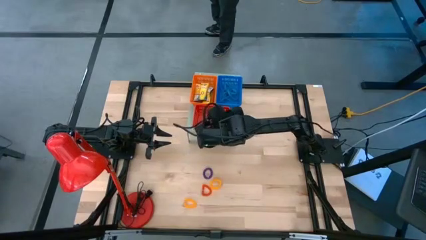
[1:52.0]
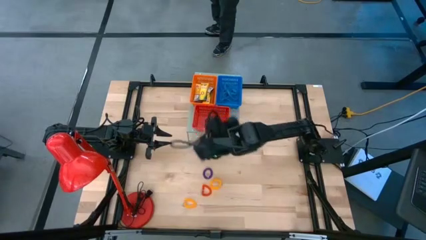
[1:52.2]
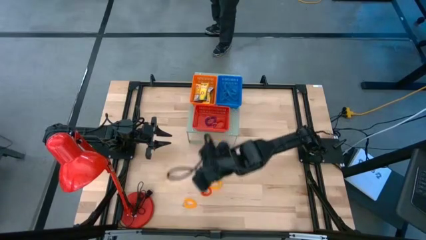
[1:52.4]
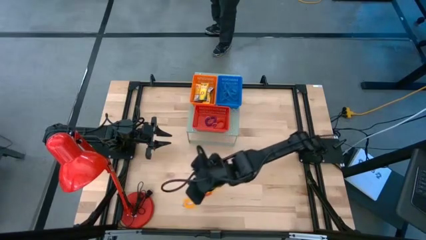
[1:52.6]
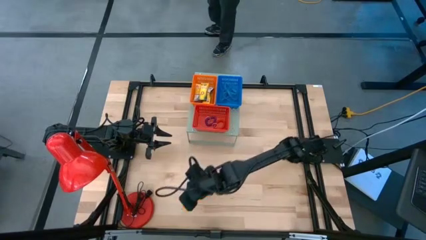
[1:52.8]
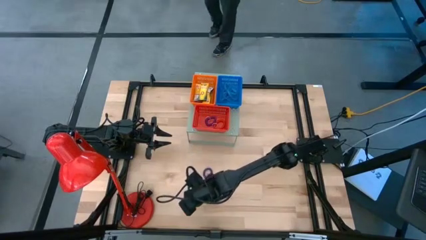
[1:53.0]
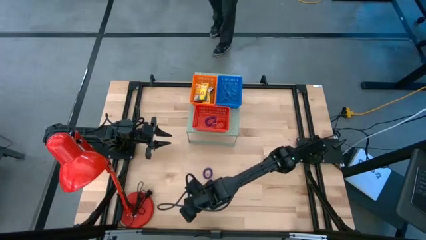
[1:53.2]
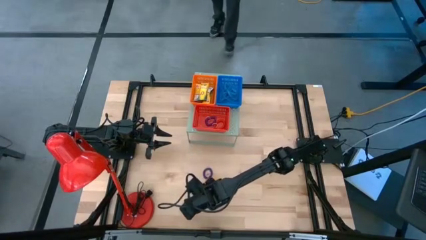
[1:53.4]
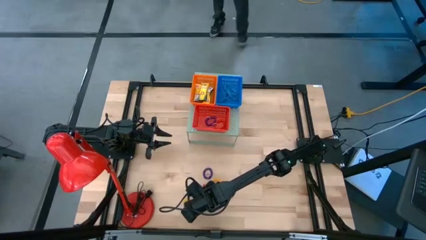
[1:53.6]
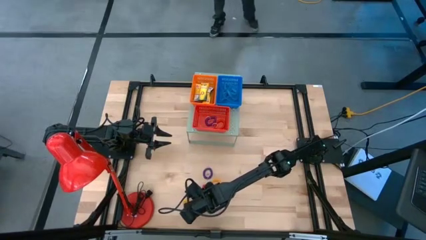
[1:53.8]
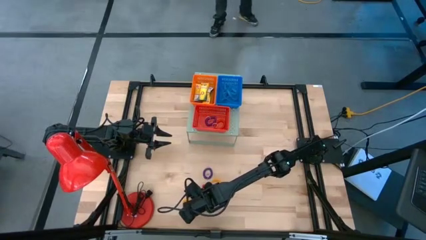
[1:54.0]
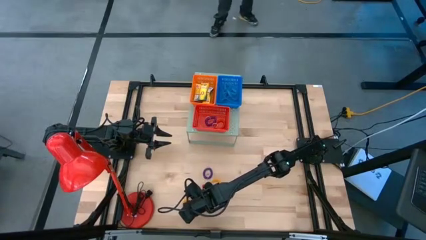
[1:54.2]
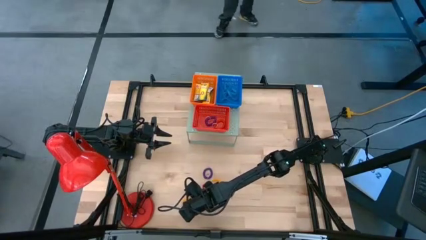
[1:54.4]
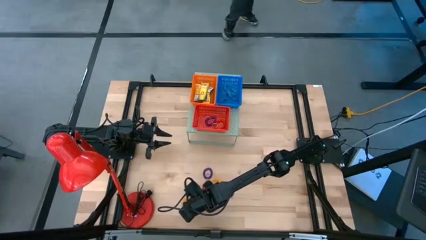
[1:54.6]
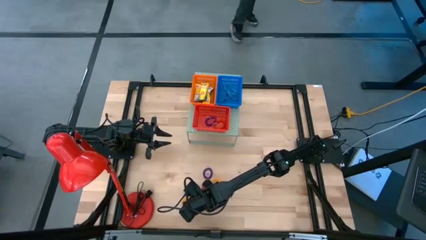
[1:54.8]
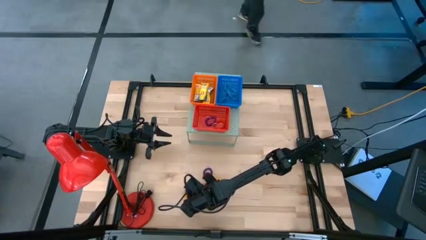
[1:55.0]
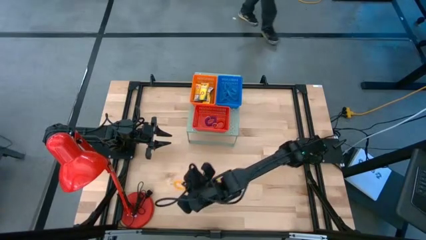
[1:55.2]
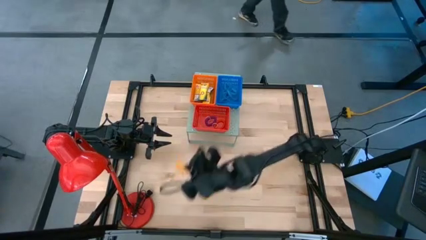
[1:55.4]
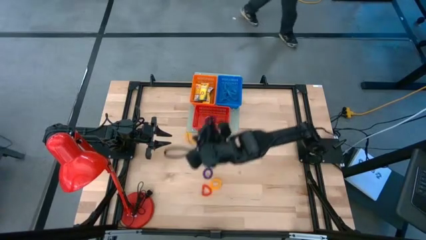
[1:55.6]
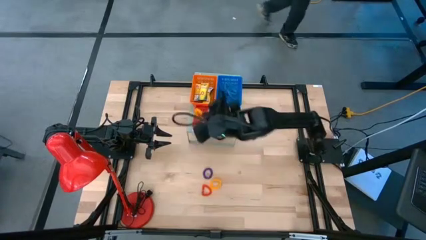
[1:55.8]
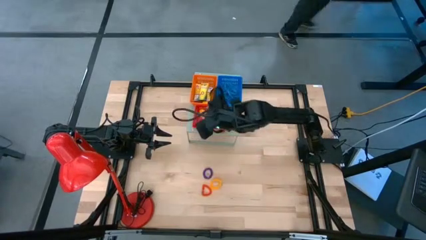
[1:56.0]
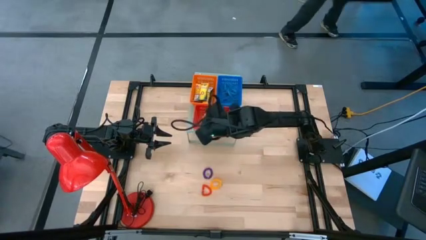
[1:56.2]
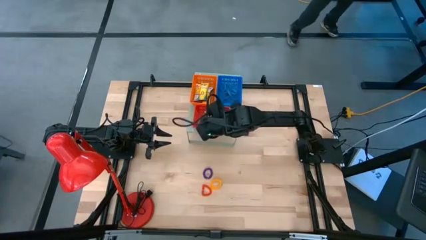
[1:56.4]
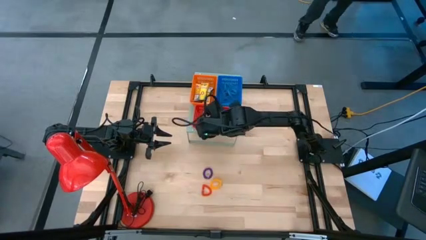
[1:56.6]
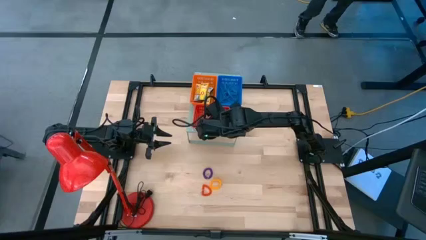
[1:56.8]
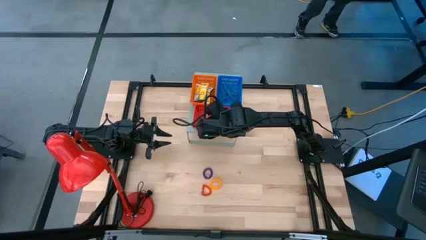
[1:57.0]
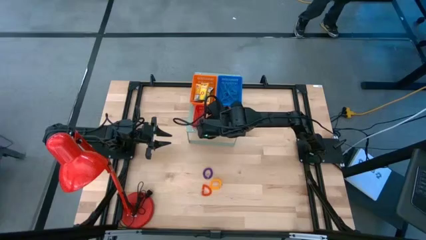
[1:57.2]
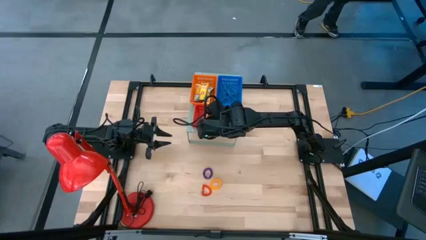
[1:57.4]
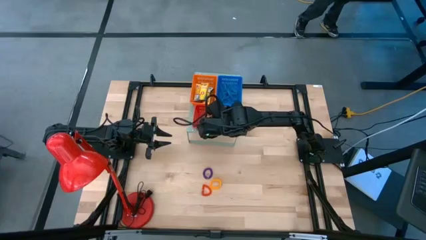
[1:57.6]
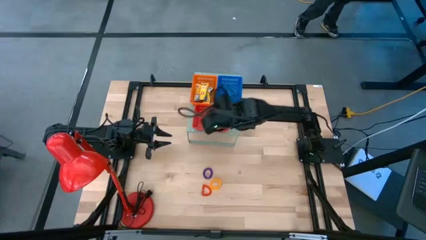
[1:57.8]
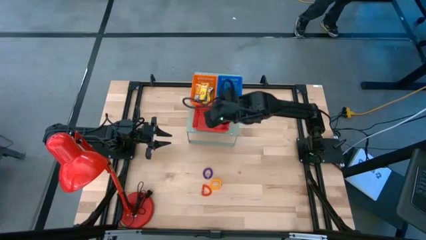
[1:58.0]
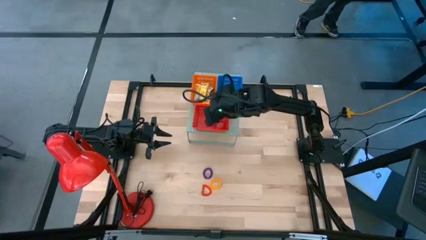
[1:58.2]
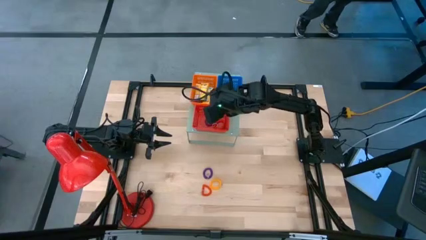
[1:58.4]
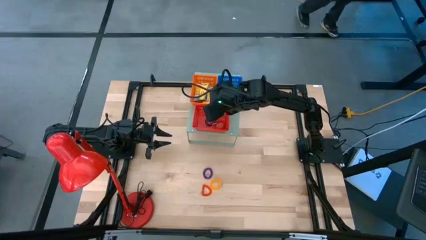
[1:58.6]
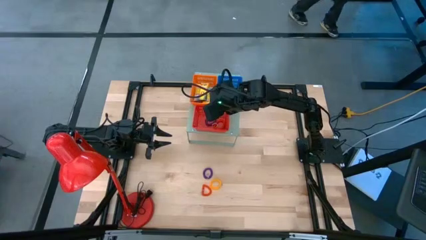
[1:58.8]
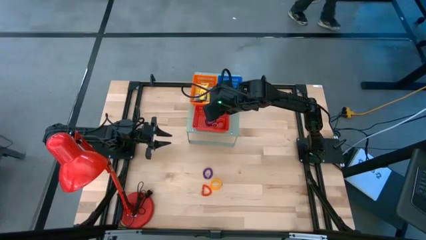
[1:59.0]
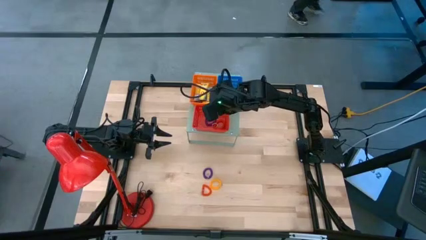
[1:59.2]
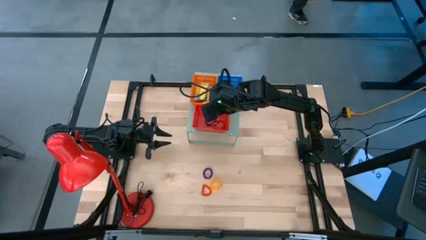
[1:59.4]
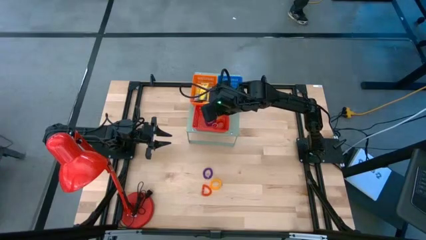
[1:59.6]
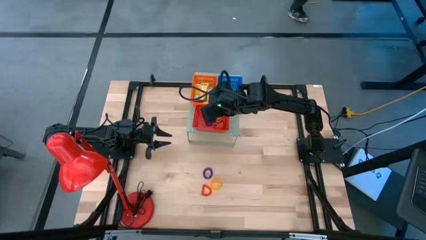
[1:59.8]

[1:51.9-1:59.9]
Task: Pick & Place Office Desk Supplies
Put the yellow spring keychain into the red bin

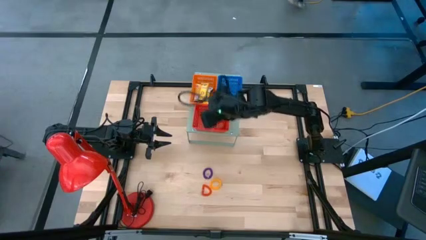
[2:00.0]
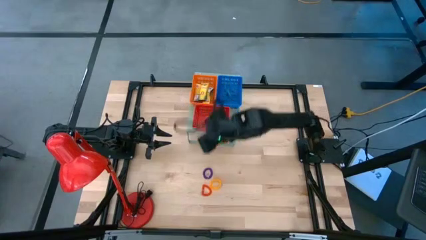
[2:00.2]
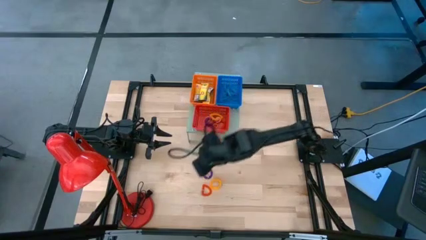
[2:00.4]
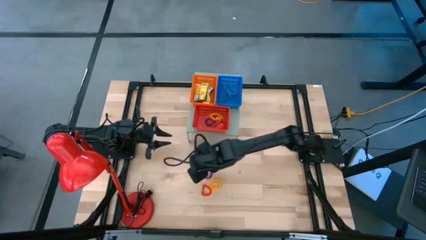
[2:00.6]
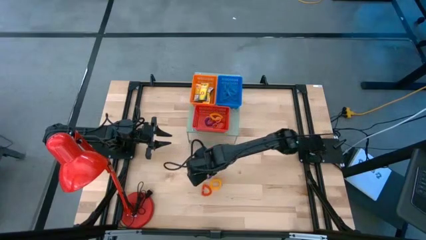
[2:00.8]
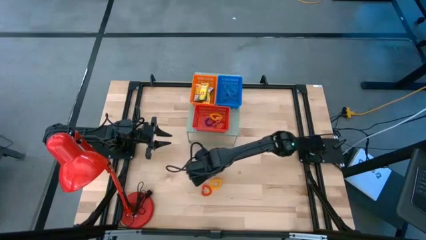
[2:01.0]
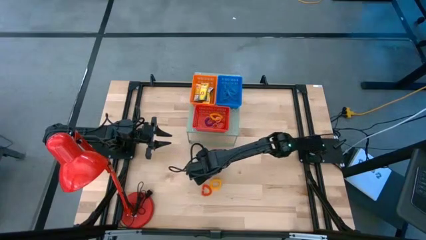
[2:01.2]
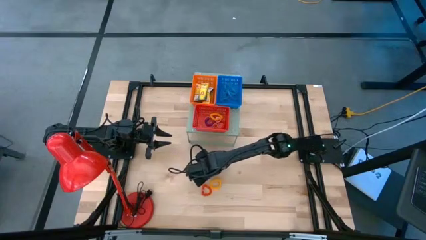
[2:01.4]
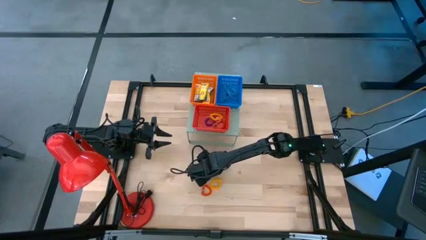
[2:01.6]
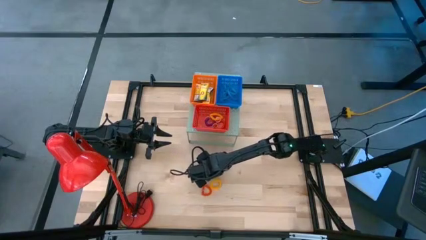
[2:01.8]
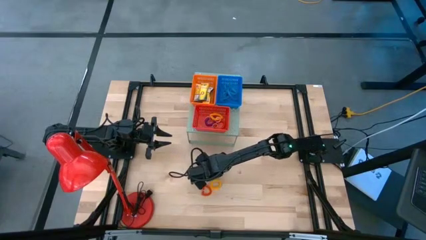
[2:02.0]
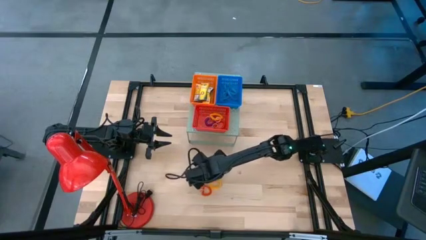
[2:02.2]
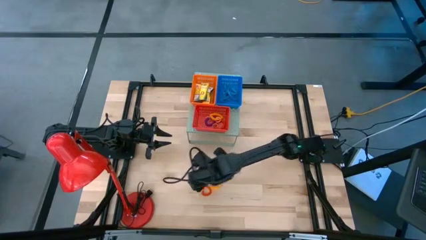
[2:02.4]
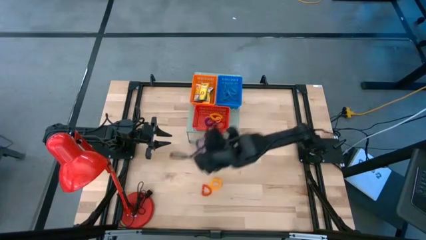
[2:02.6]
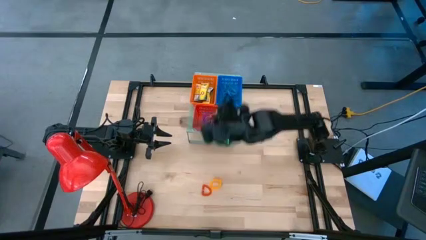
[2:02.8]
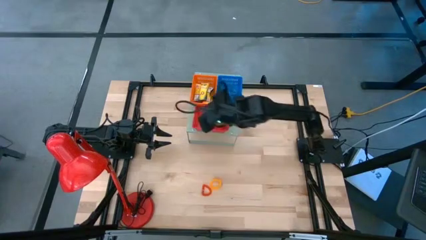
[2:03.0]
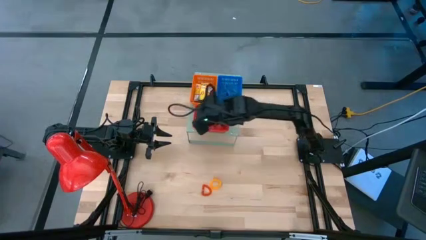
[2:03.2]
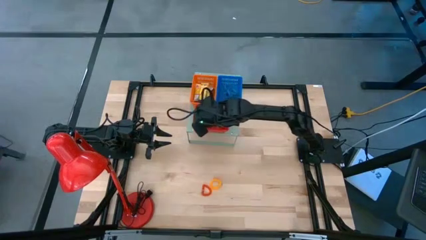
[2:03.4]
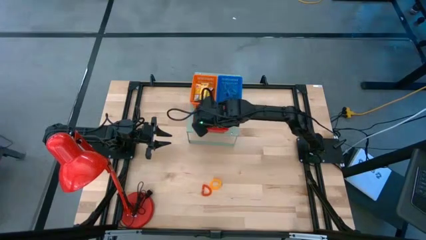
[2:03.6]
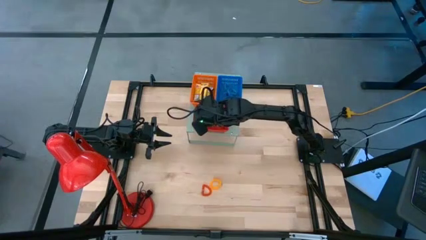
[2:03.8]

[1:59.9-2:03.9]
Put the spring keychain into the red bin

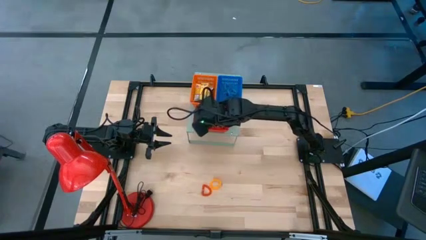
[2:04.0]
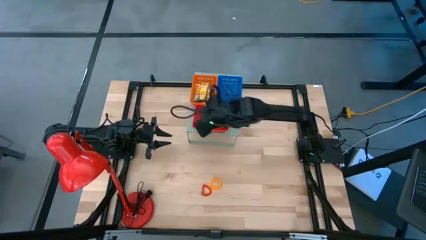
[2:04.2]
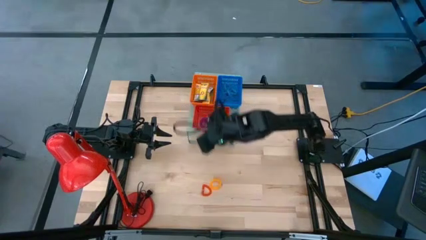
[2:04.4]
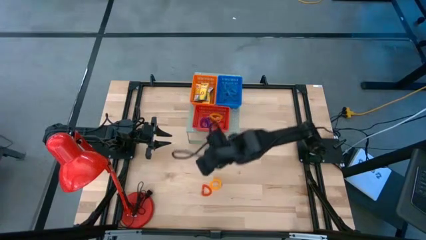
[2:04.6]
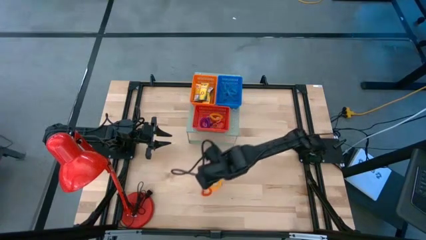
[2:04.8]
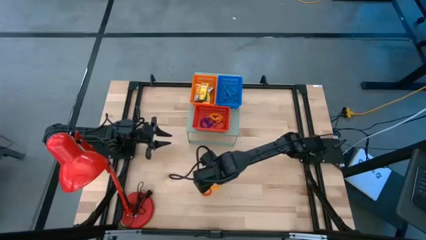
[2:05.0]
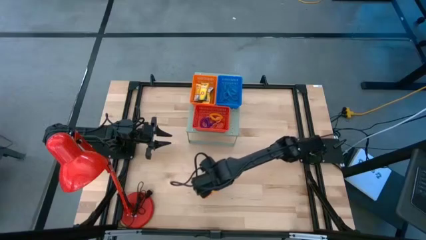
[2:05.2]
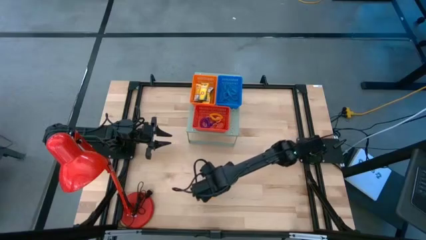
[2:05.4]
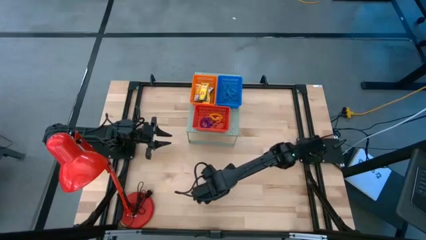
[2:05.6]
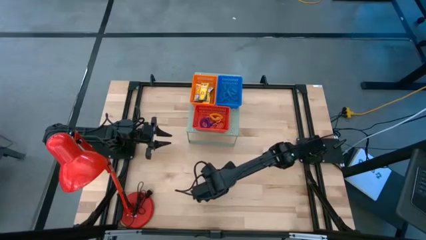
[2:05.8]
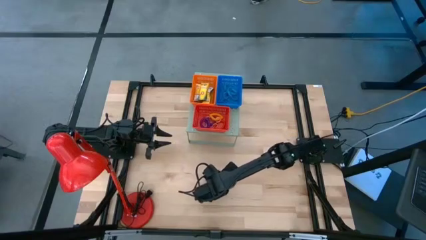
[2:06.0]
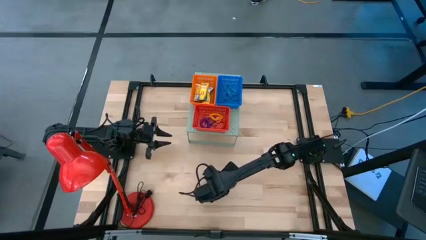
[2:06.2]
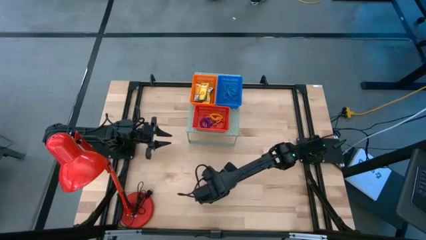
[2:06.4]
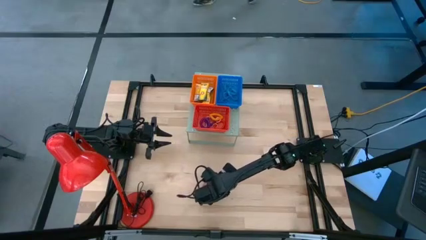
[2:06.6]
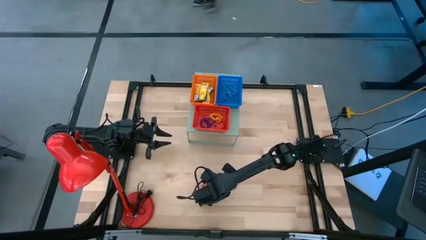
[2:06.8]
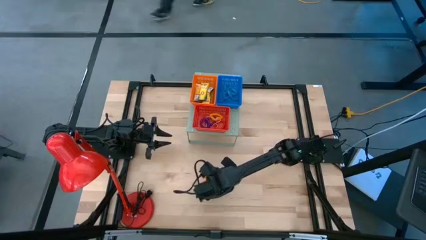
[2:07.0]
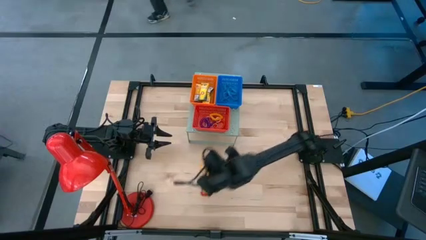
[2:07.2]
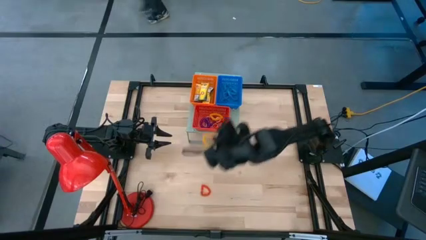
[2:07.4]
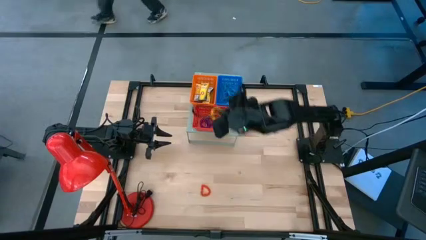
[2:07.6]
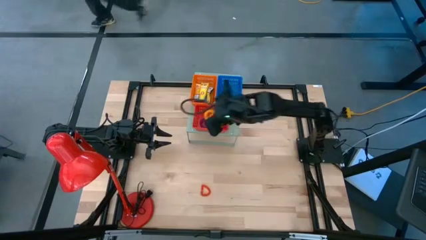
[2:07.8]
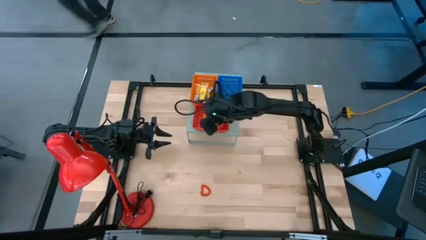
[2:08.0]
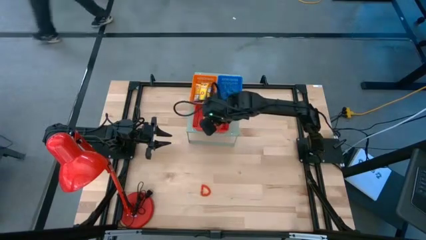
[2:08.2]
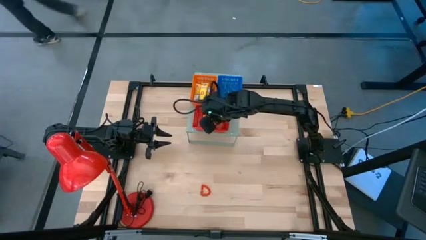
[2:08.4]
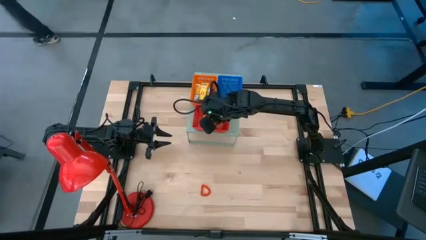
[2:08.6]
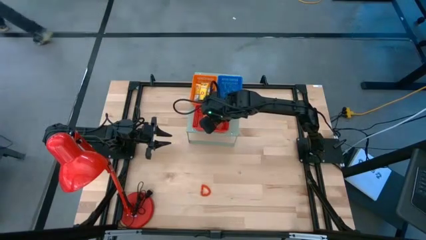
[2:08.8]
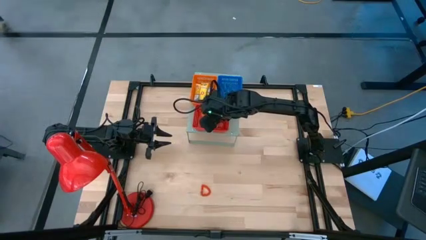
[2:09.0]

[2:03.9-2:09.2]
Put the yellow spring keychain into the red bin
